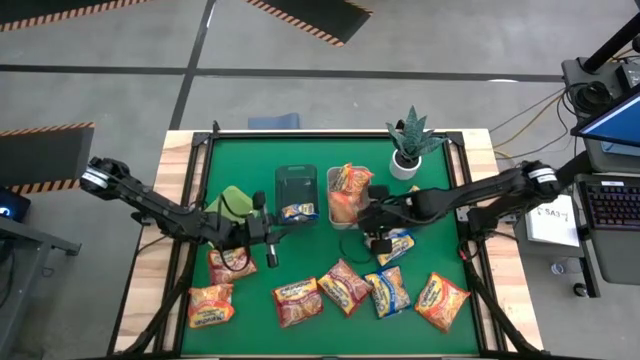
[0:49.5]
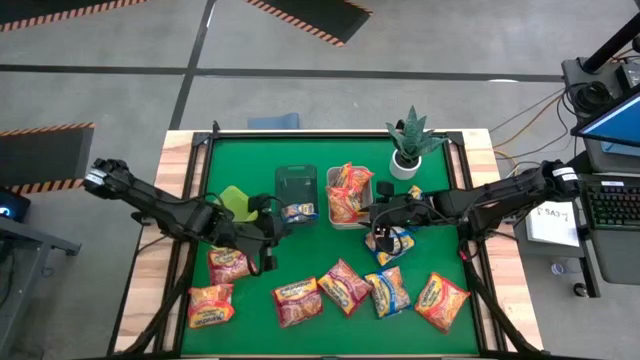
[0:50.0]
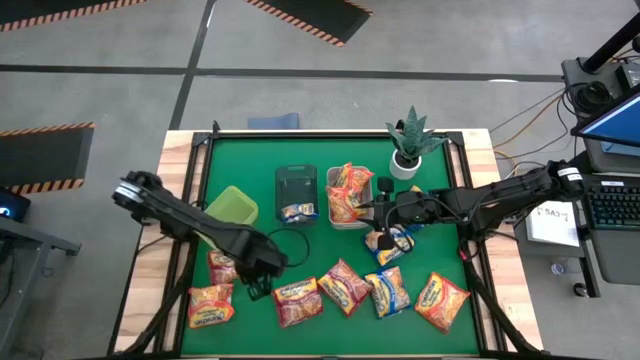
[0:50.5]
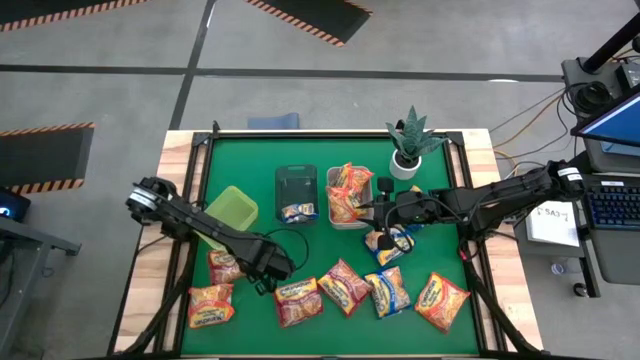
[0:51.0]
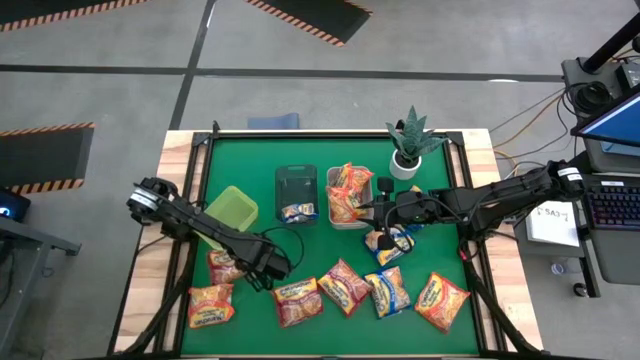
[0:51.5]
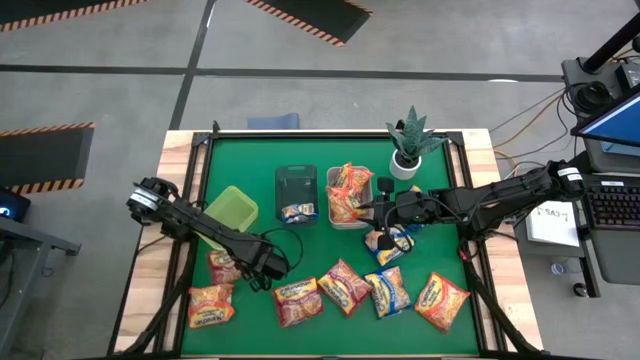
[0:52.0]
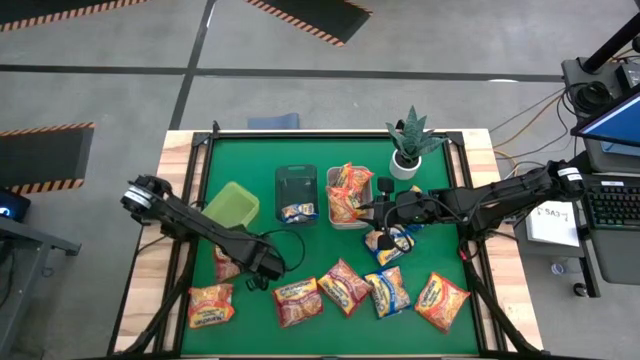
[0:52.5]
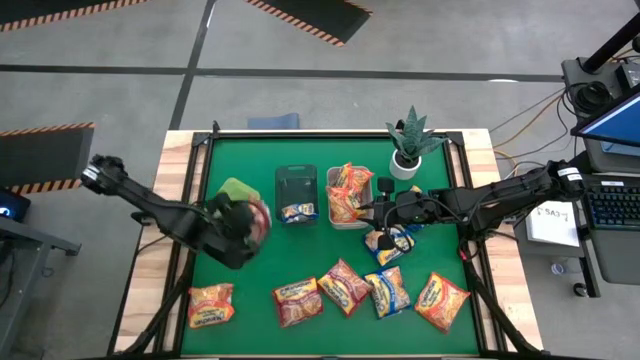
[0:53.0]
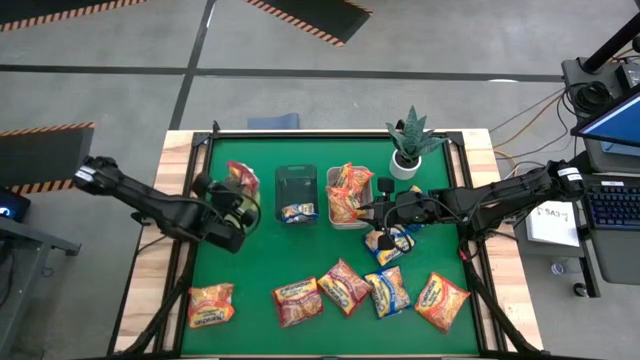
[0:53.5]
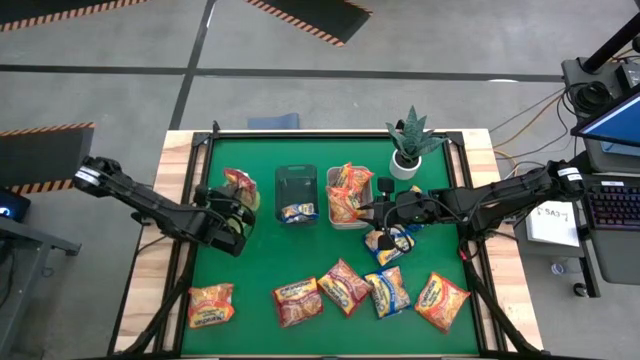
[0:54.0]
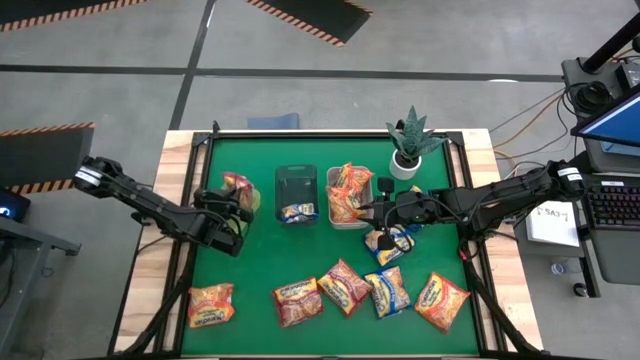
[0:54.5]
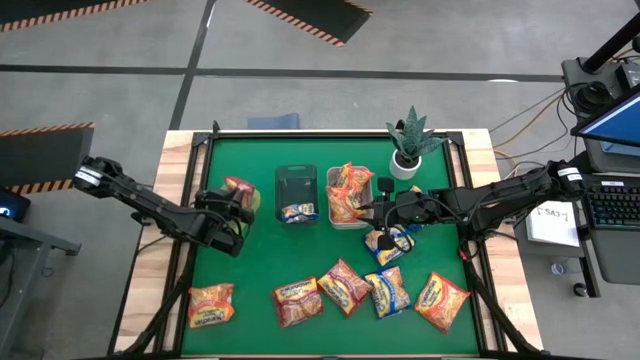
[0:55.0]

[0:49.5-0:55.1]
Task: Sort Maruchan noodles
Put the red noodle pack into the yellow bin

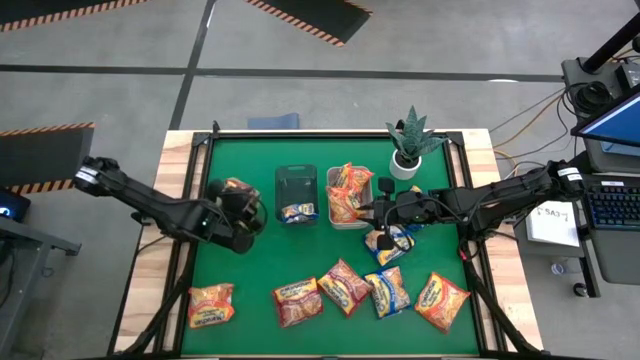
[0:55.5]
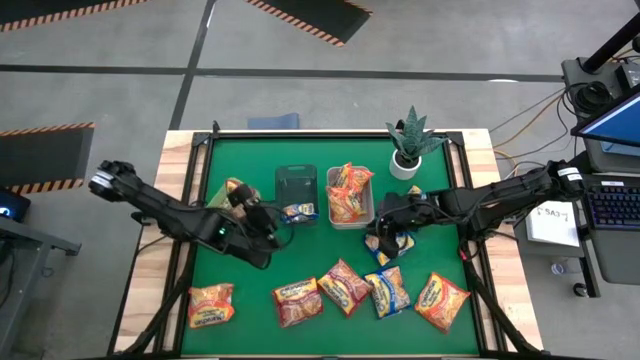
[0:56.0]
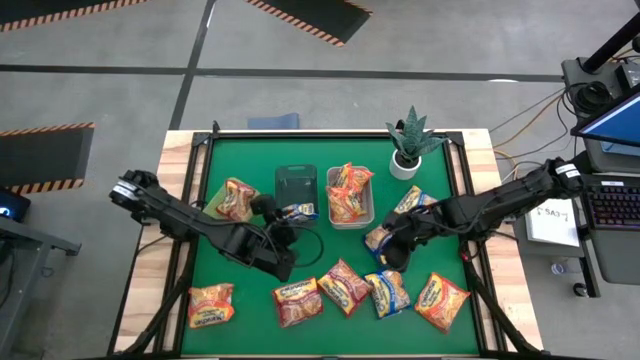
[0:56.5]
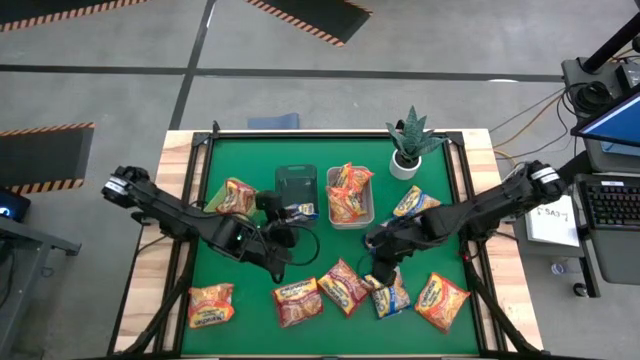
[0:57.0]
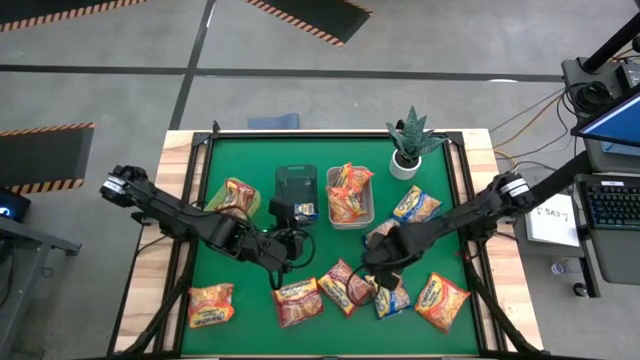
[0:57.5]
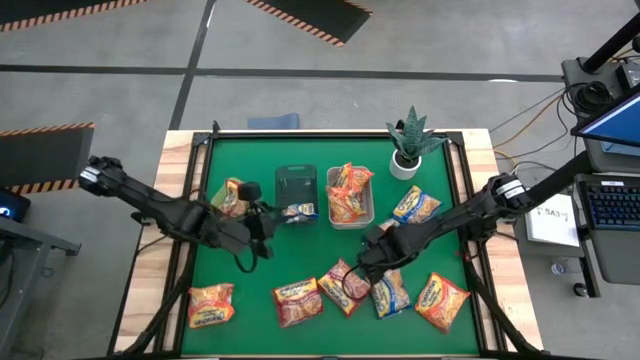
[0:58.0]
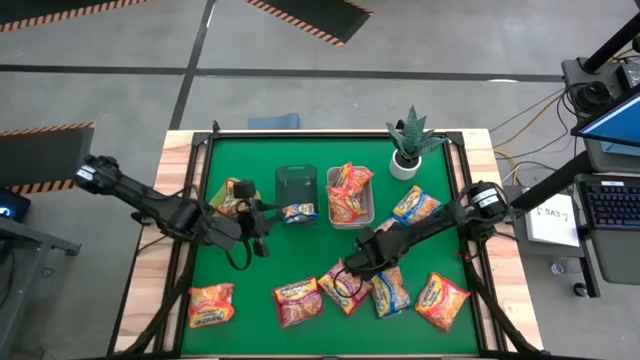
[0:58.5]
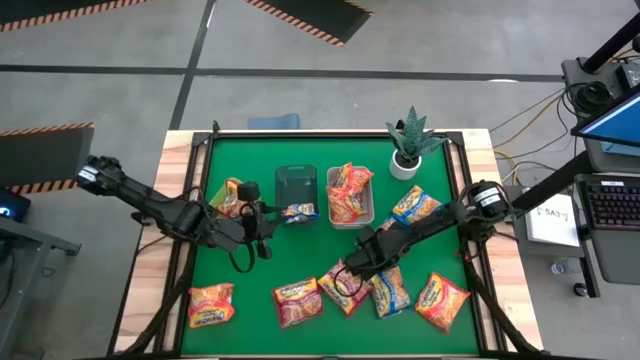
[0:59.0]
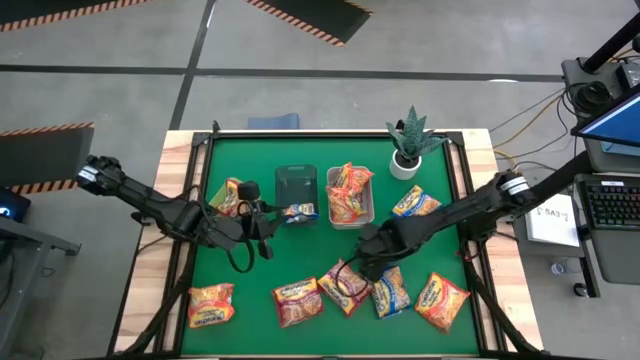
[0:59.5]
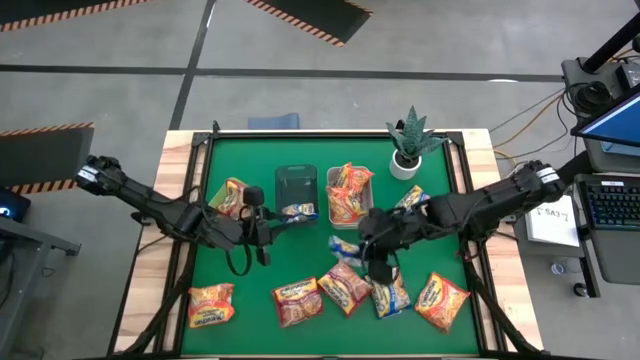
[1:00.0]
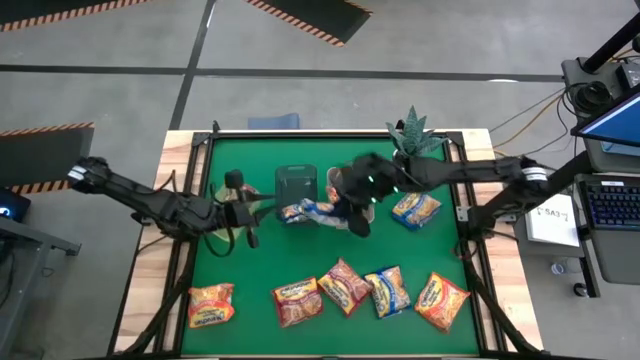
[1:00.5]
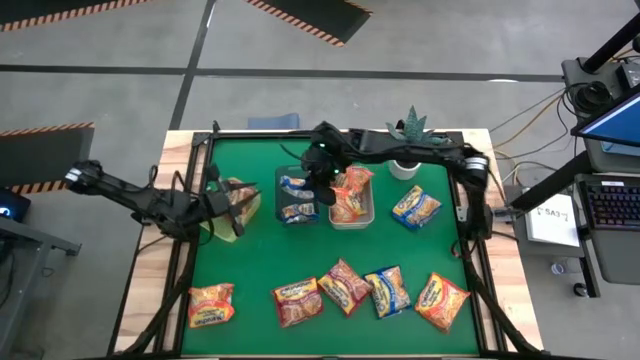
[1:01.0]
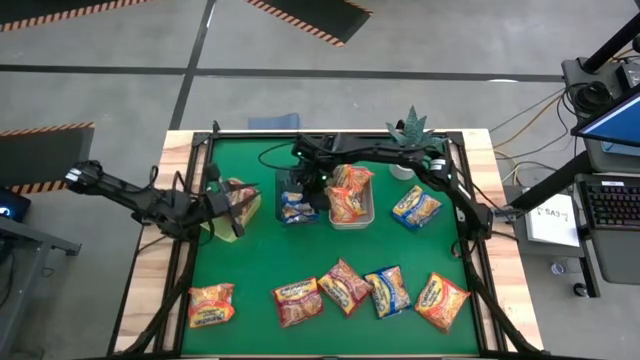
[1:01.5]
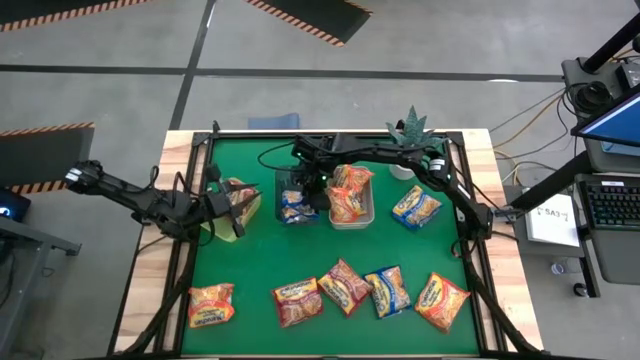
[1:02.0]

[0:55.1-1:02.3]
Put the blue noodle pack into the black bin

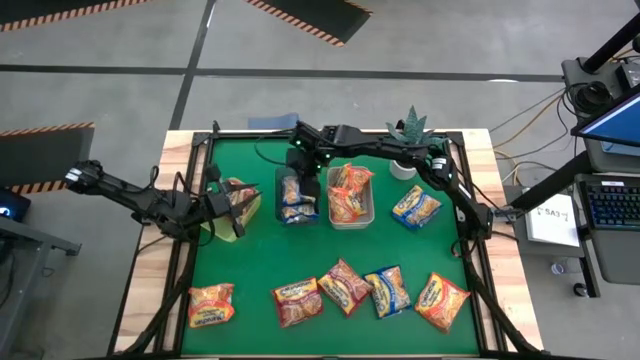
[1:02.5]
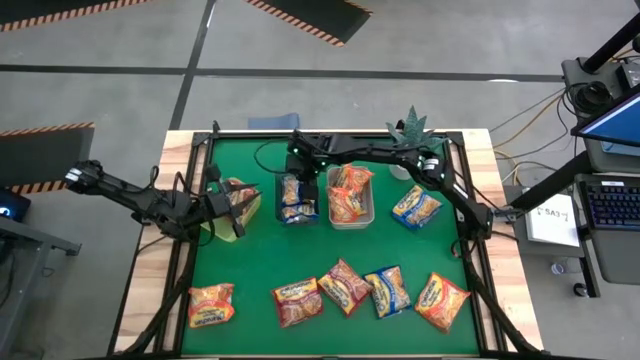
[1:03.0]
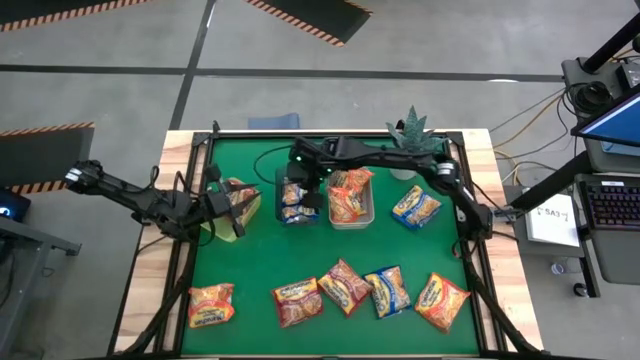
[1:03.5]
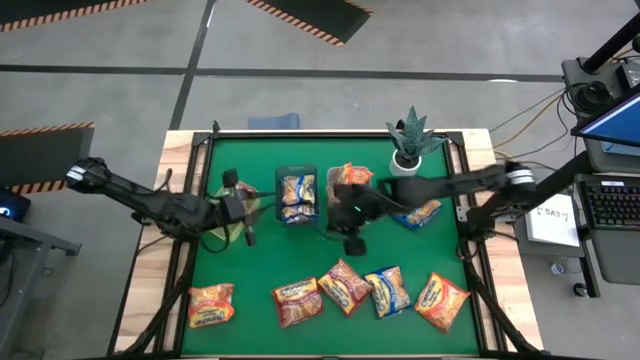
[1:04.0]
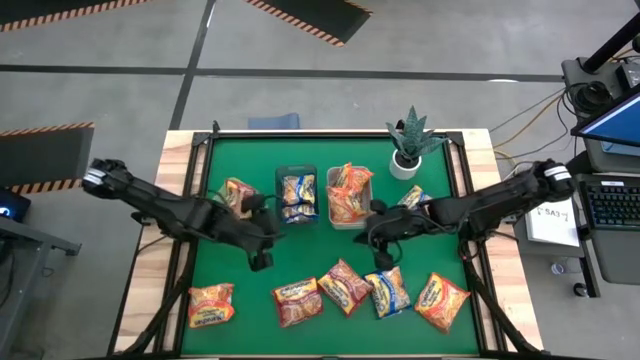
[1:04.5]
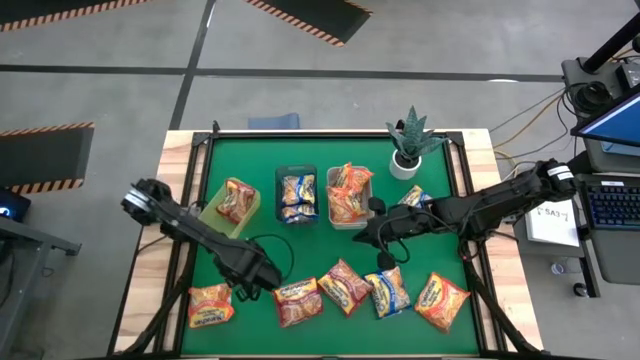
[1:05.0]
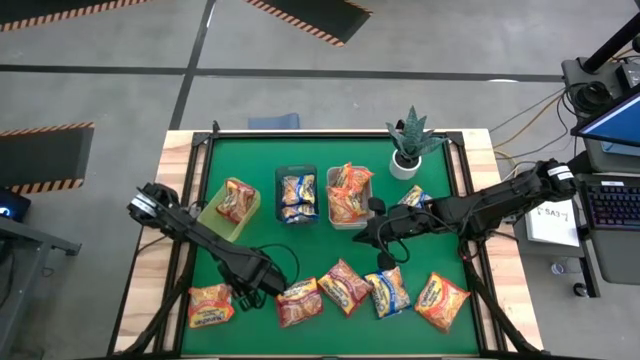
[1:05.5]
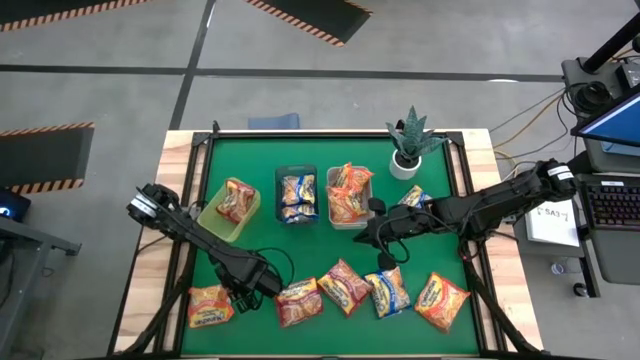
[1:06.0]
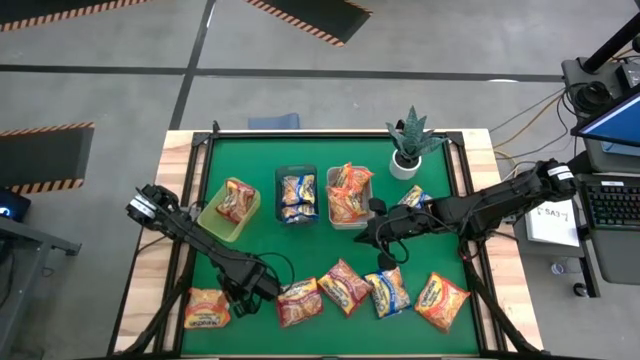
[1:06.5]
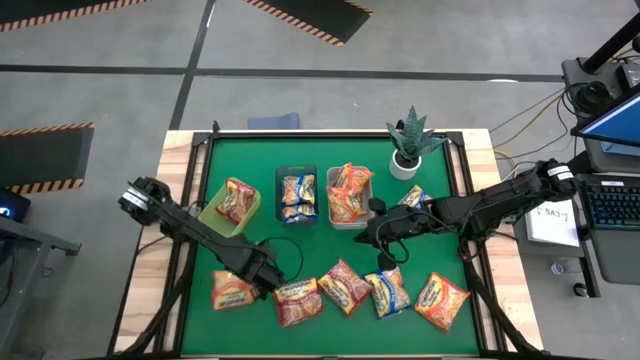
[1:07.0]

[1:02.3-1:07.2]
Put the orange noodle pack into the gray bin
